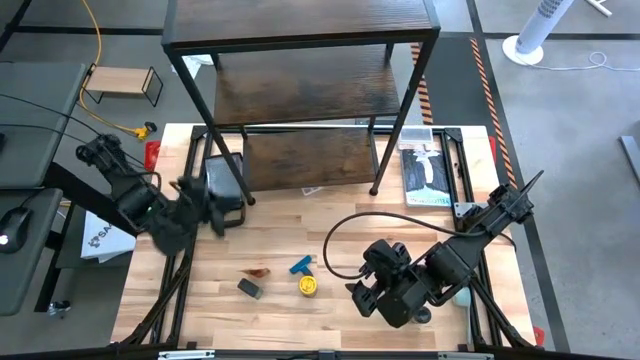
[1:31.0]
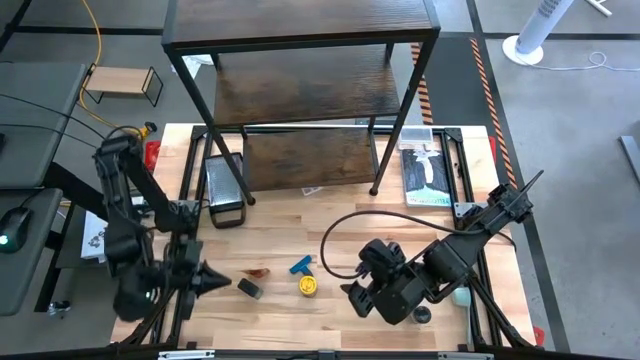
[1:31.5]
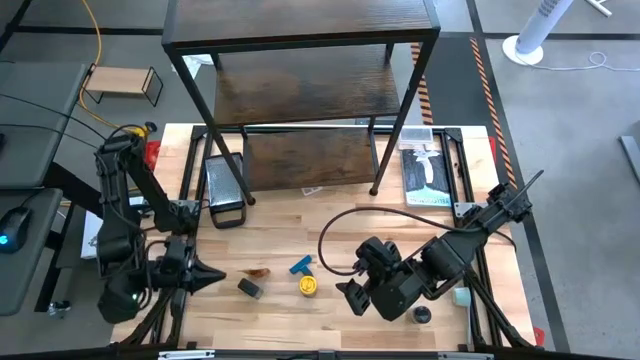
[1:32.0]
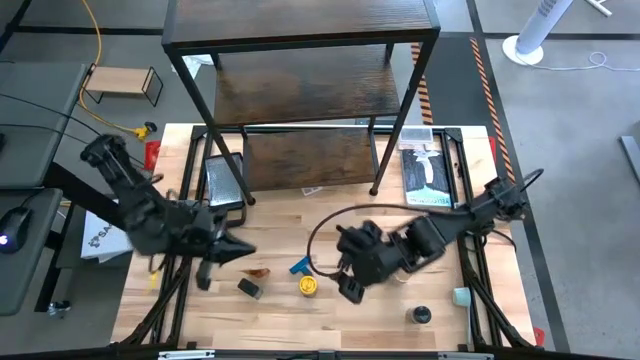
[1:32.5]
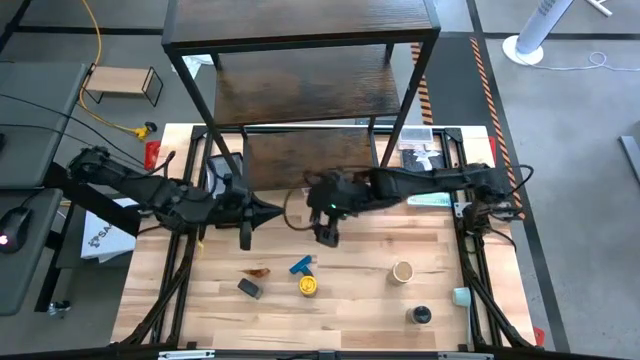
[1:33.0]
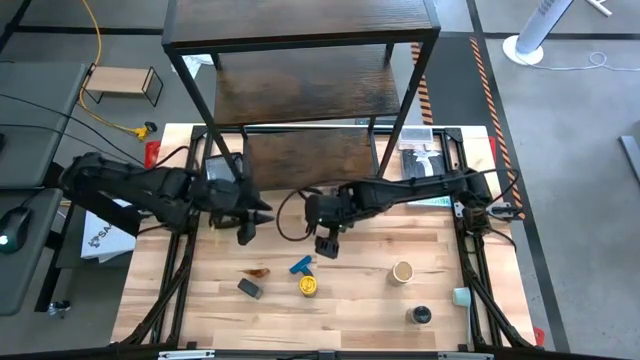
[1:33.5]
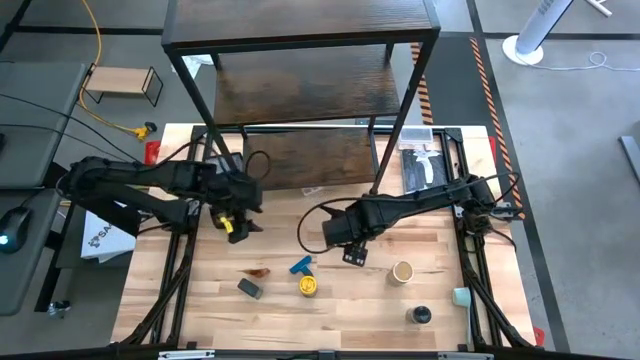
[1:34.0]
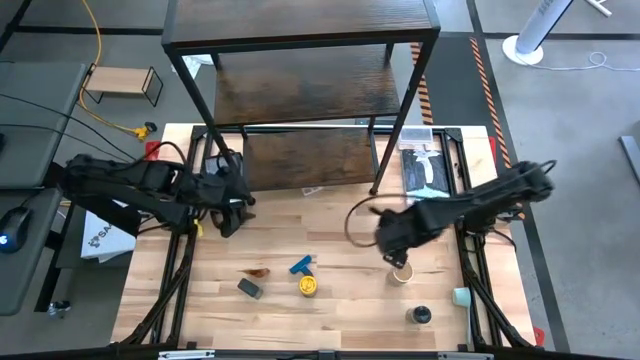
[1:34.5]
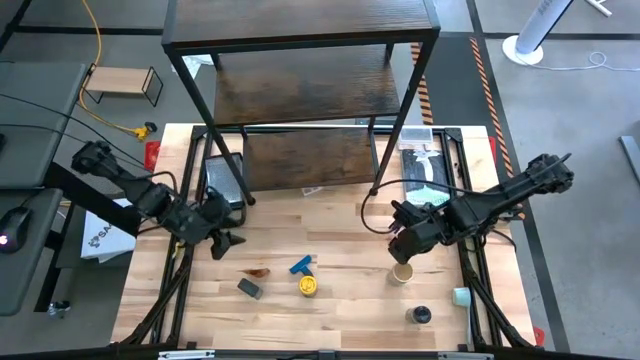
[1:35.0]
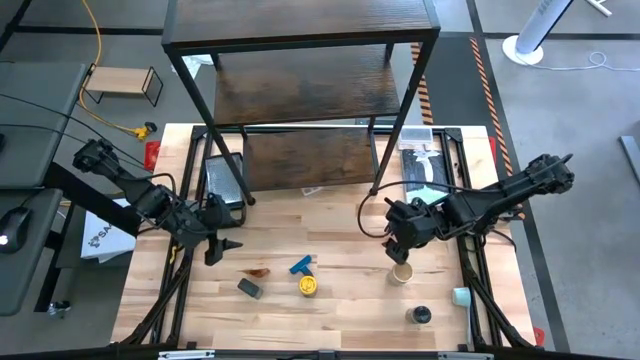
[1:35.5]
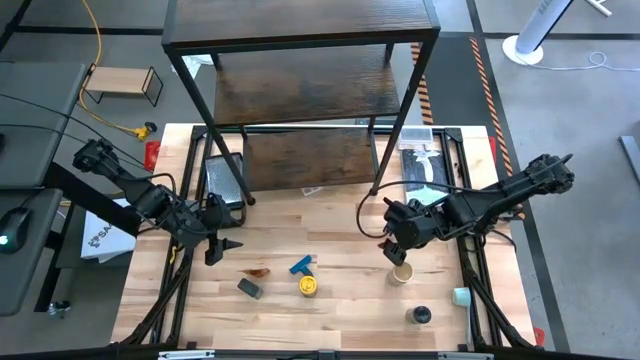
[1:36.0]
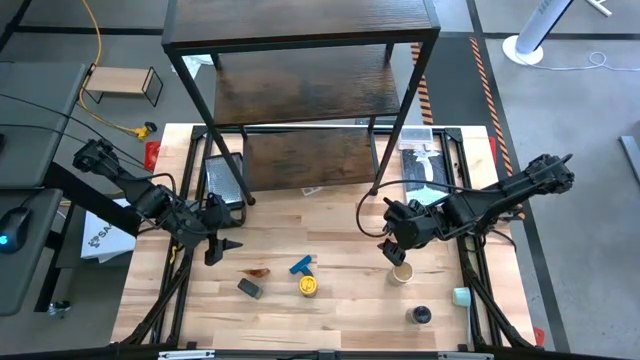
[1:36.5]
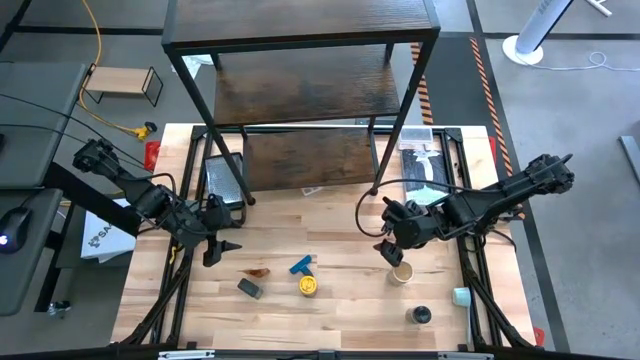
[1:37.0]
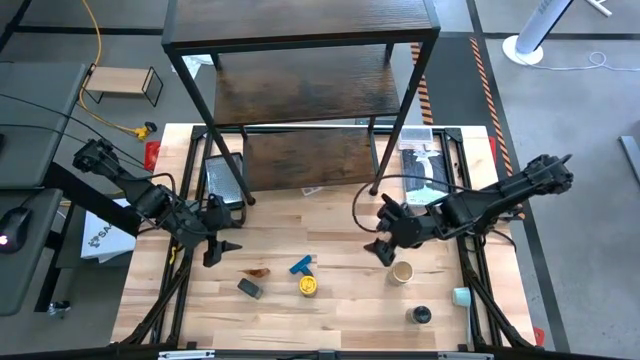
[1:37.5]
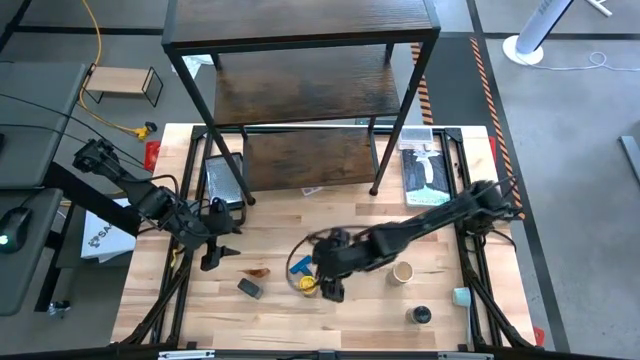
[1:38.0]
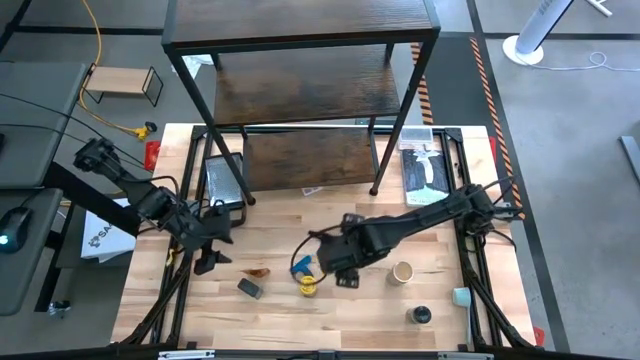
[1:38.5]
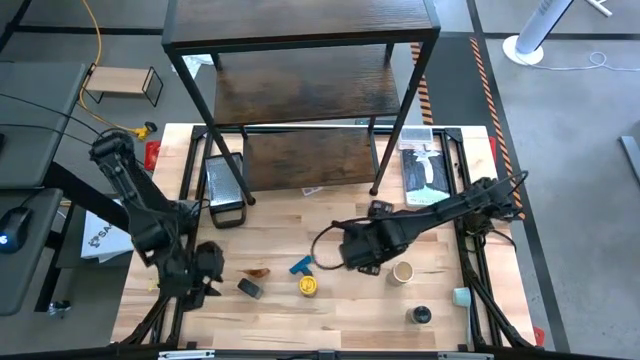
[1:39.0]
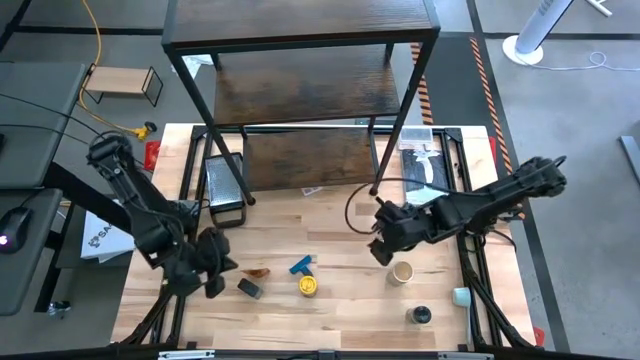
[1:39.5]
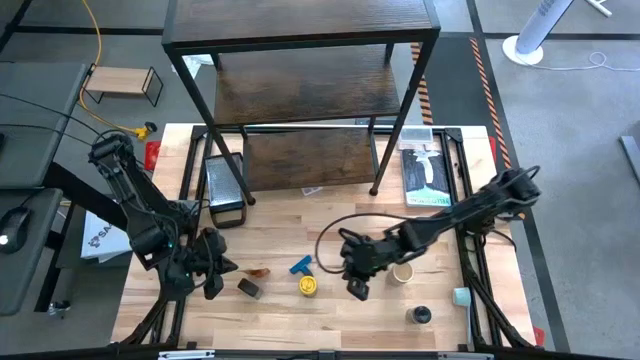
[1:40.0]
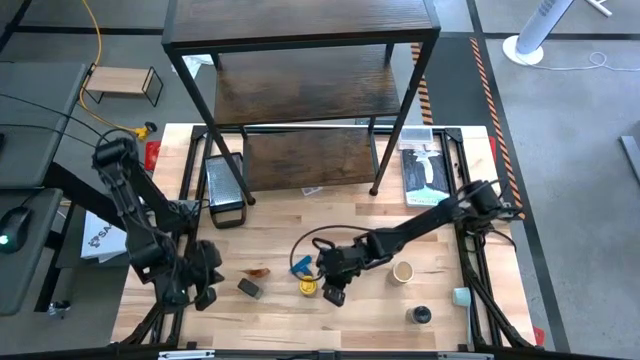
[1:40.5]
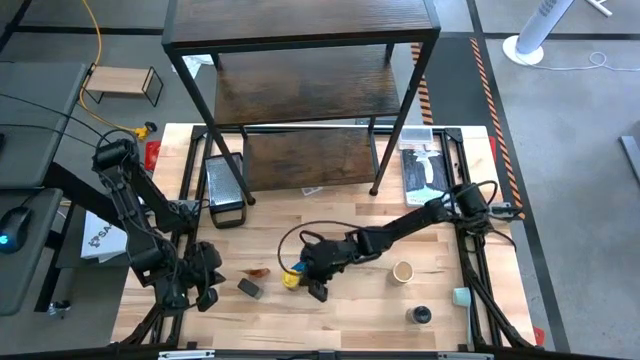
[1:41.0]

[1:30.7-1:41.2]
Task: Shelf spices
Adjust the yellow seasoning can

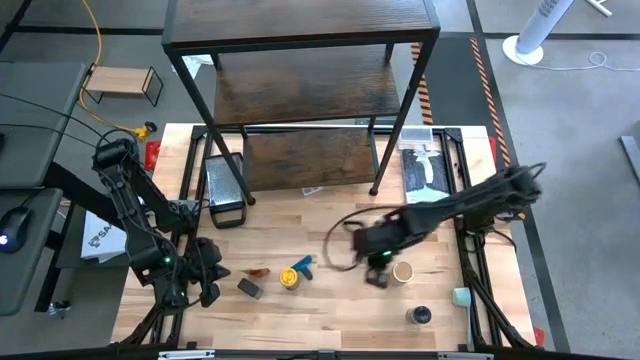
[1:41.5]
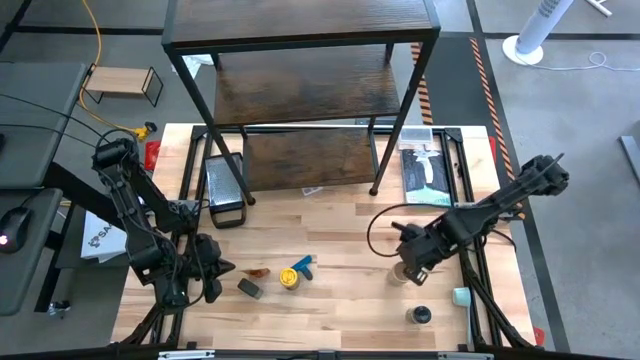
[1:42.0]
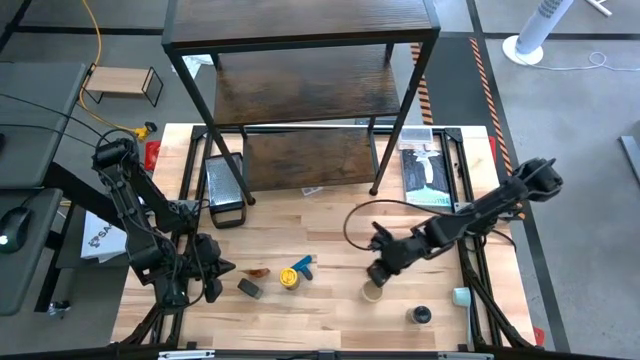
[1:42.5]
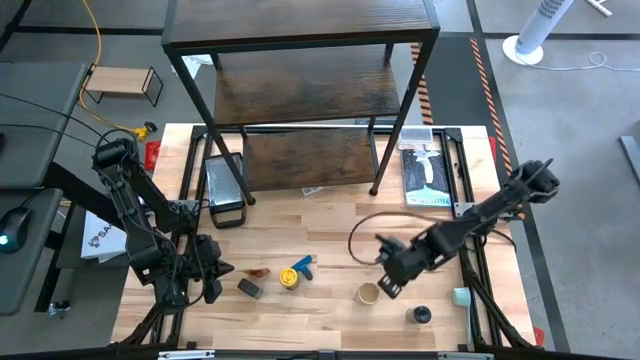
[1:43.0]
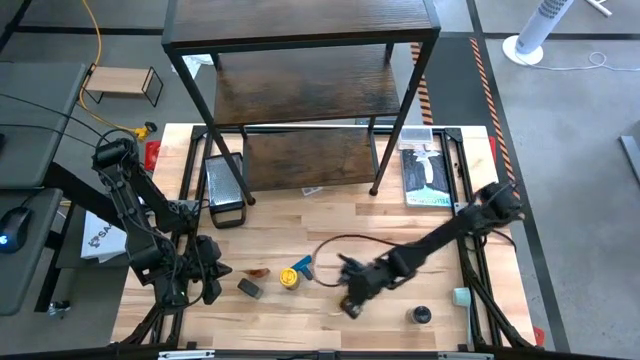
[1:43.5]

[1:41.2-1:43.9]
Move the brown seasoning bottle to the left side of the table

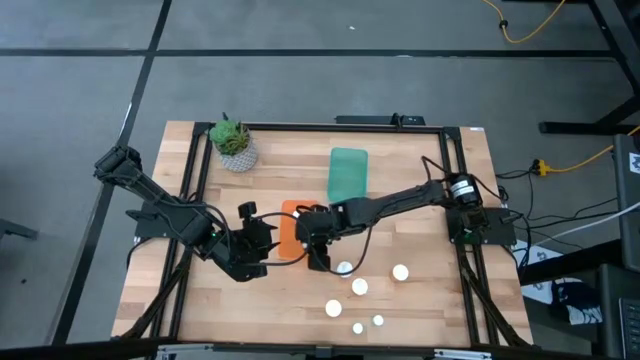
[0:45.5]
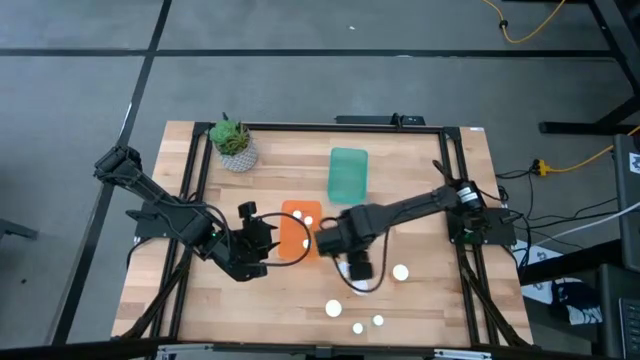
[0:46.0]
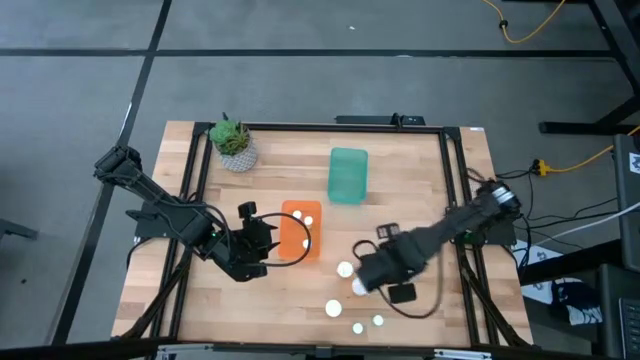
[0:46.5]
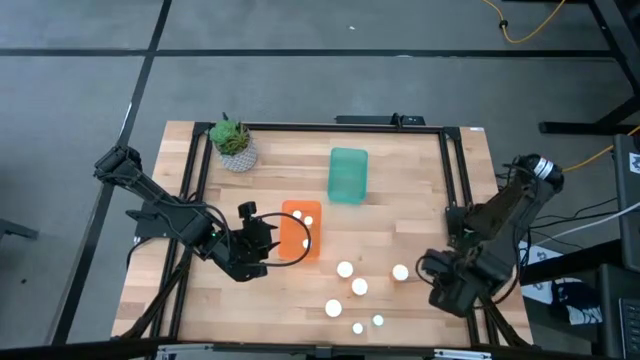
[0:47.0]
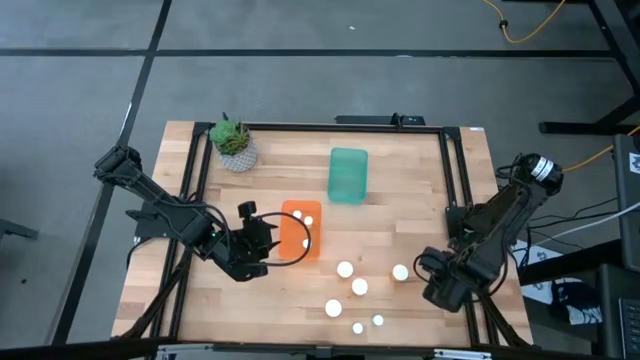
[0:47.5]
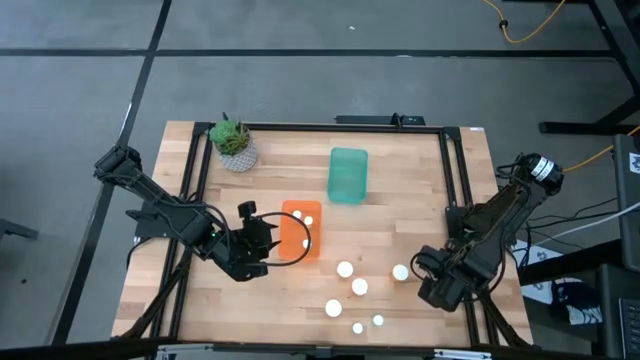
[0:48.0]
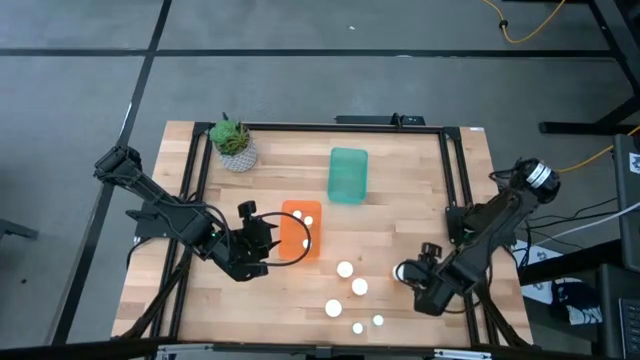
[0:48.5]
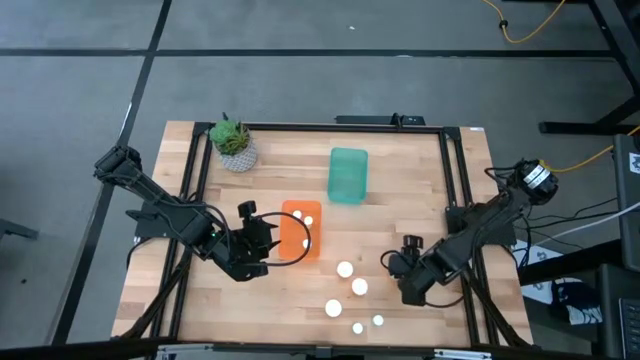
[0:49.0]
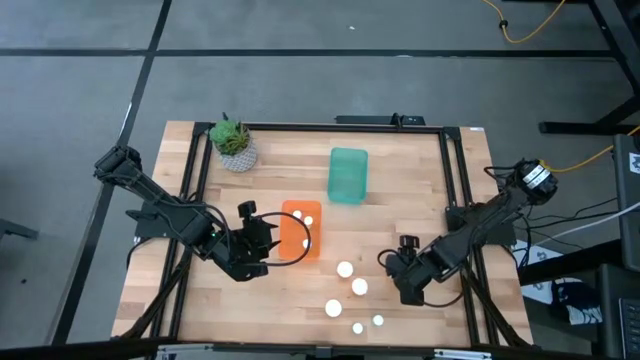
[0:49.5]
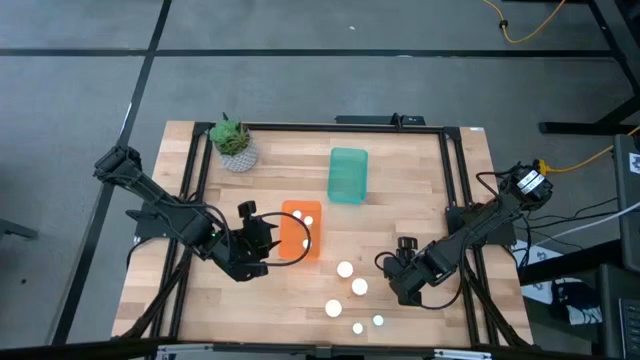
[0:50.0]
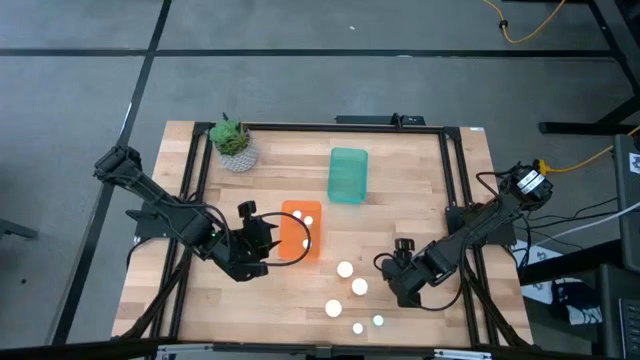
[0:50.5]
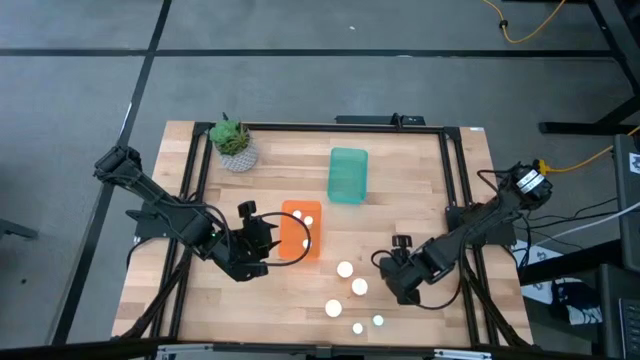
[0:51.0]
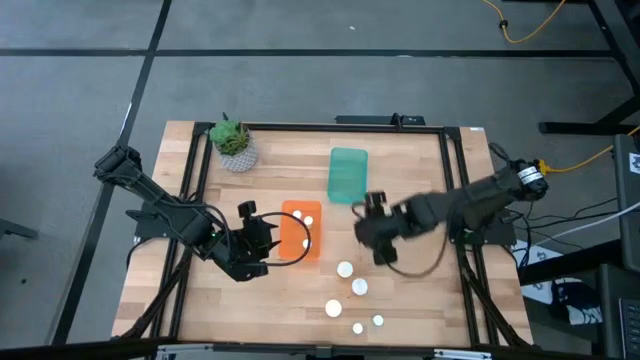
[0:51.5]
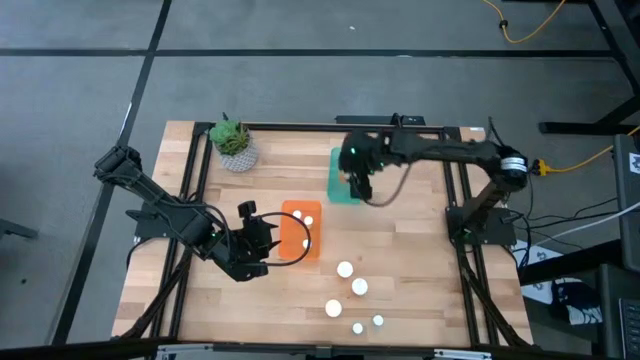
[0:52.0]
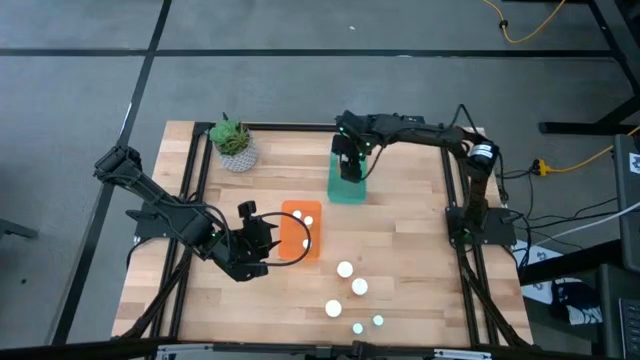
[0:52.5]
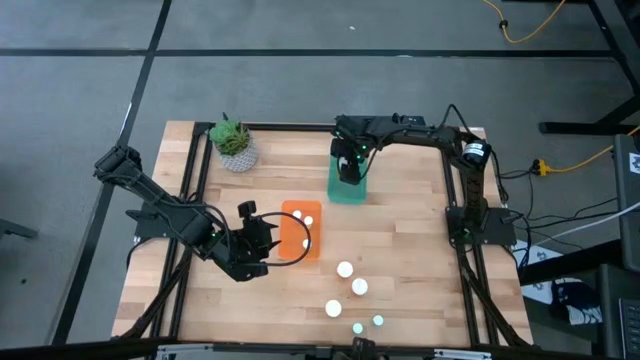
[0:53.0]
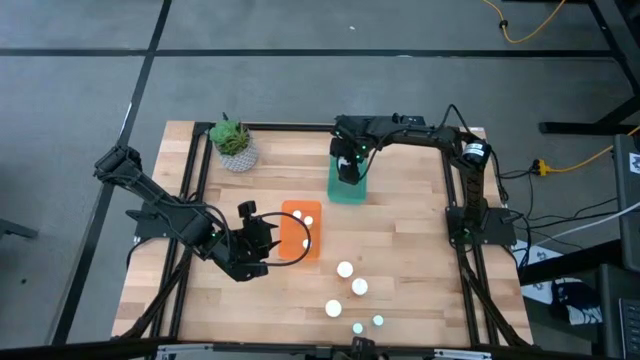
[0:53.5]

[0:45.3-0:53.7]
Task: Pick and place medicine bottles into bin by pill shape (circle, oval)
Put the large orange pill bottle into the blue bin

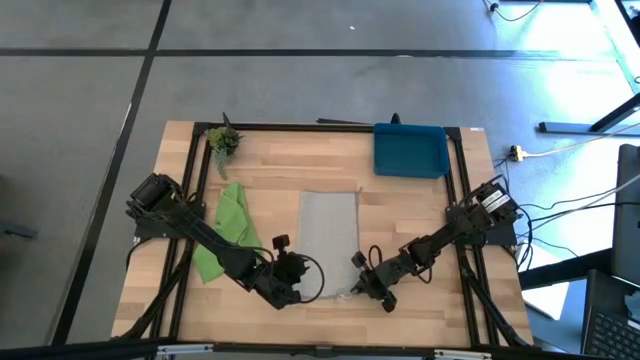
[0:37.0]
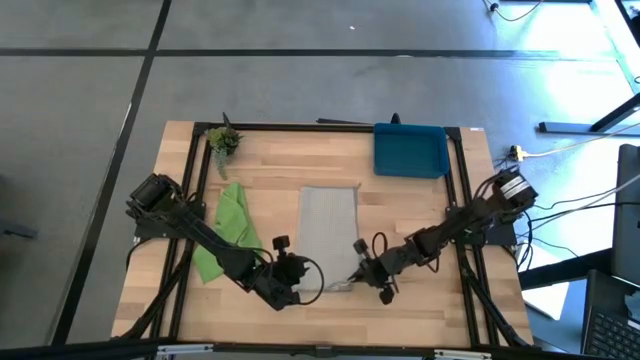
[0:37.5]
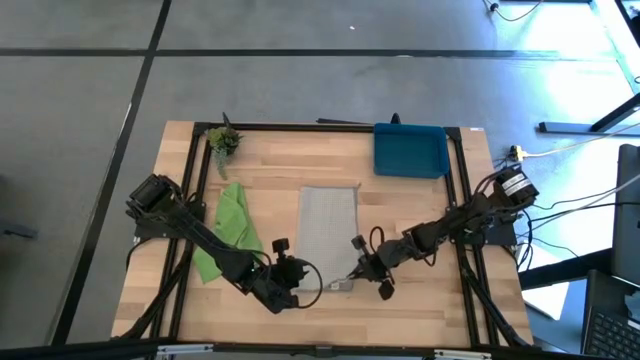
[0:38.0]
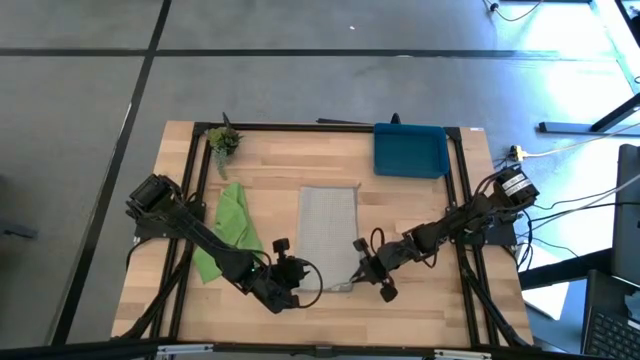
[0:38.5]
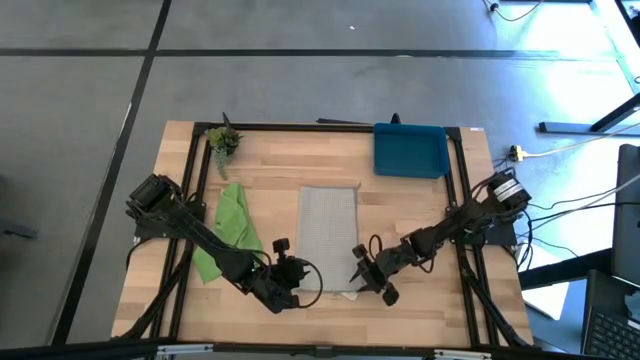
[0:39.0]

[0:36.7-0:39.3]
Task: Roll microfiber towels into tight, uniform cylinder then place into a basket
Fold the gray microfiber cloth
